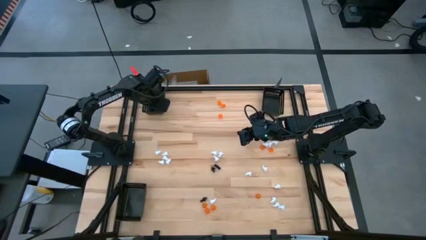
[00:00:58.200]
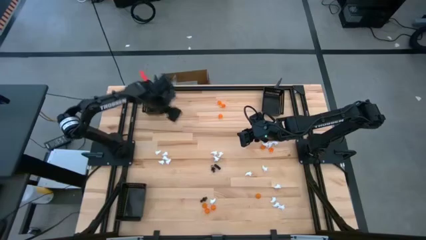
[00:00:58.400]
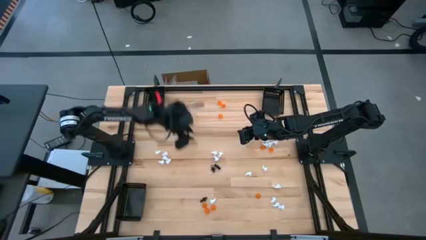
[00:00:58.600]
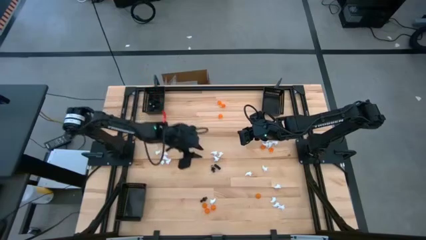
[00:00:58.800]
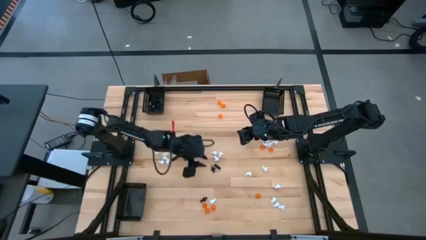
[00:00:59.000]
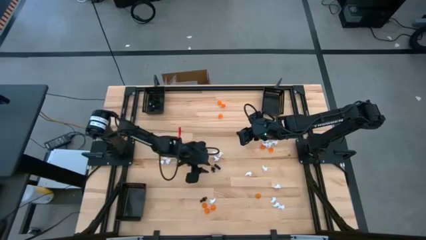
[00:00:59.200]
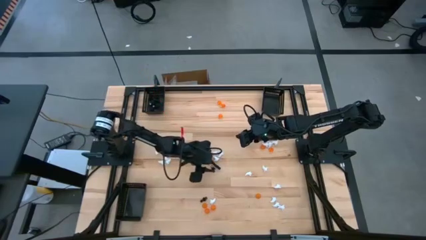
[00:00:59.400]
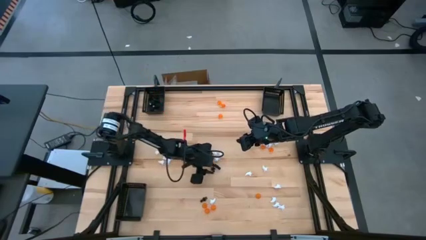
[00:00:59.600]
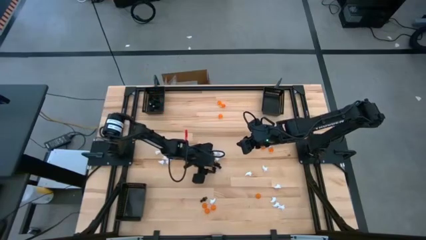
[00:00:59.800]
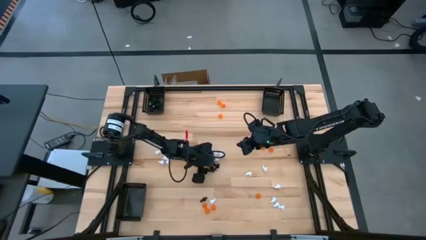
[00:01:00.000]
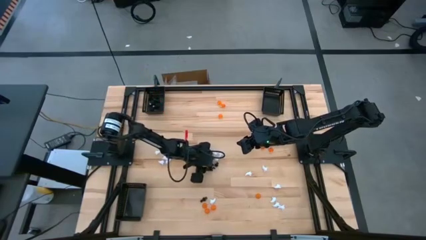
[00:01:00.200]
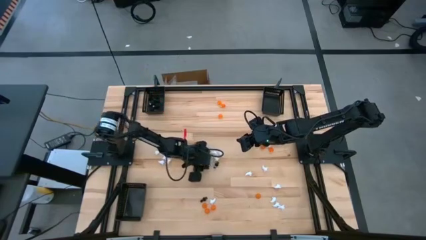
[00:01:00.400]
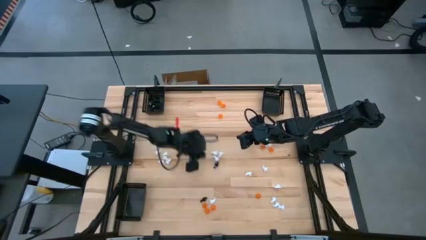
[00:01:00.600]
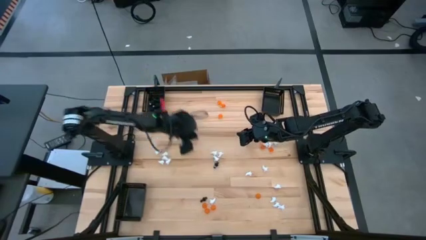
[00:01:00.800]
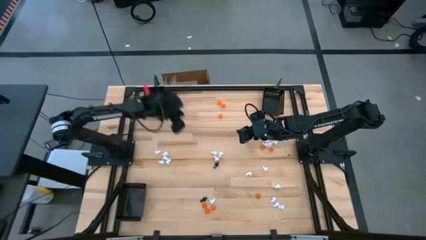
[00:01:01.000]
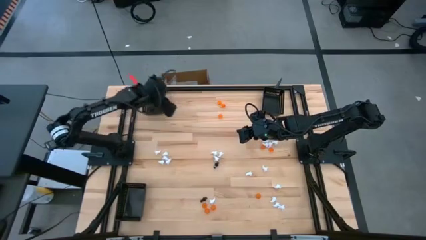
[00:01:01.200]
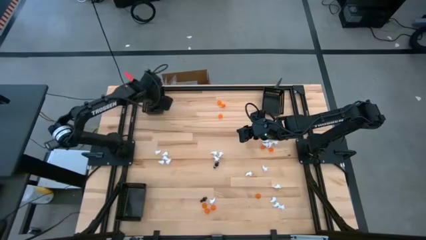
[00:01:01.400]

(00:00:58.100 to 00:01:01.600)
Task: Sort Halloween decoration
Put the black skeleton toy into the top left black basket

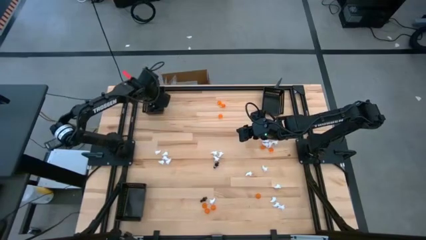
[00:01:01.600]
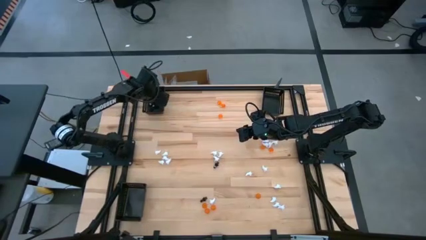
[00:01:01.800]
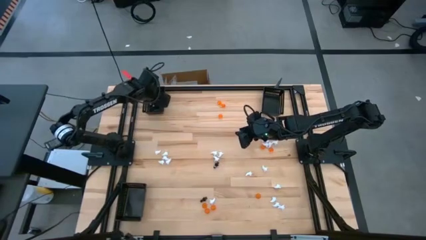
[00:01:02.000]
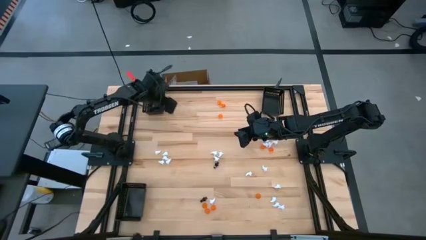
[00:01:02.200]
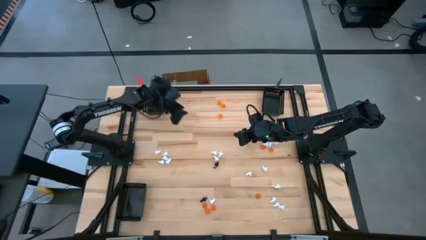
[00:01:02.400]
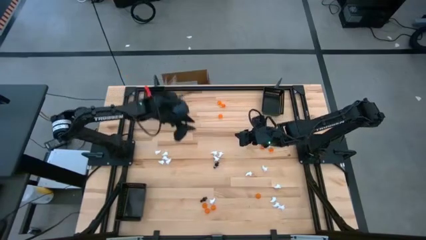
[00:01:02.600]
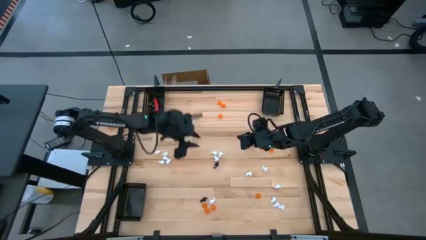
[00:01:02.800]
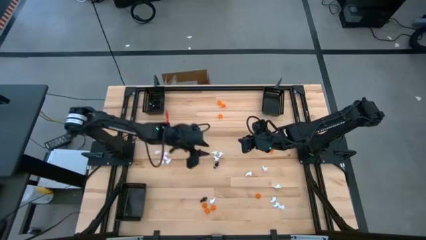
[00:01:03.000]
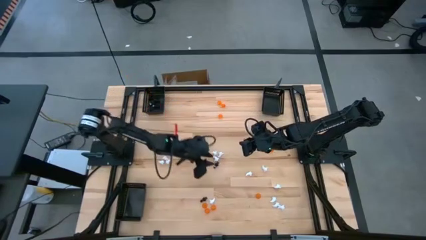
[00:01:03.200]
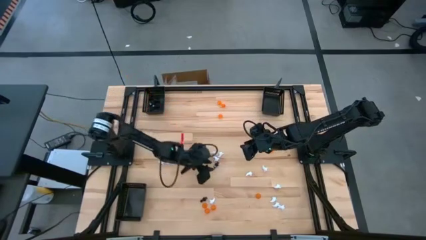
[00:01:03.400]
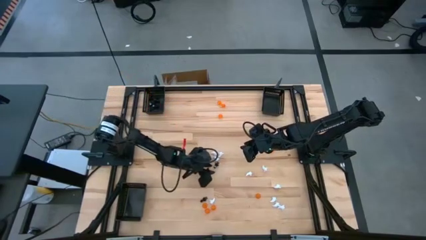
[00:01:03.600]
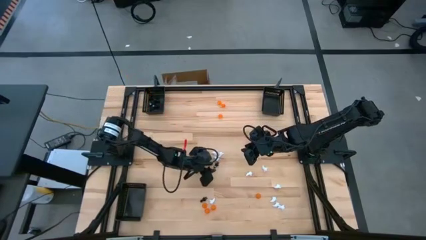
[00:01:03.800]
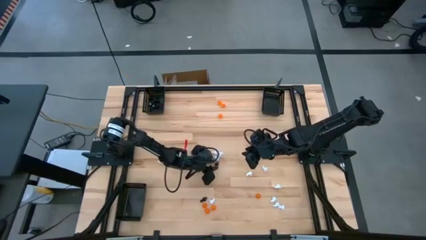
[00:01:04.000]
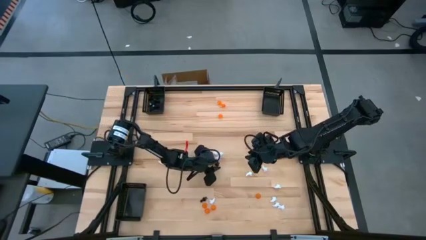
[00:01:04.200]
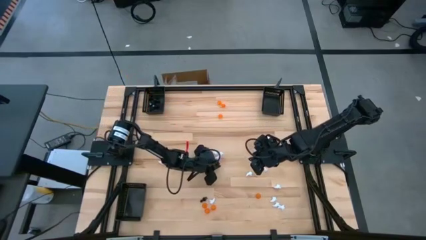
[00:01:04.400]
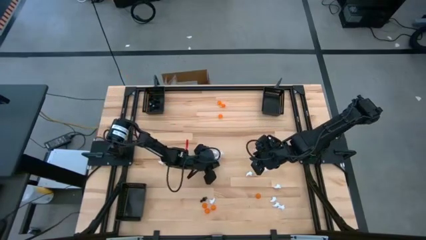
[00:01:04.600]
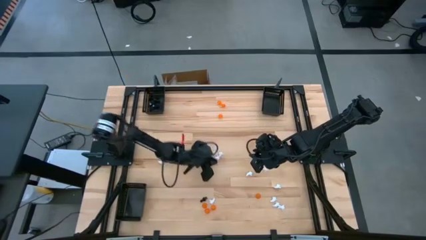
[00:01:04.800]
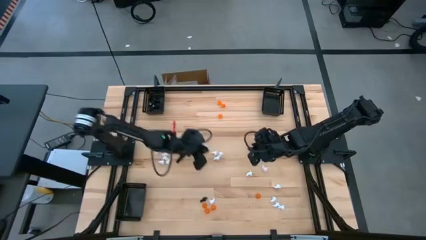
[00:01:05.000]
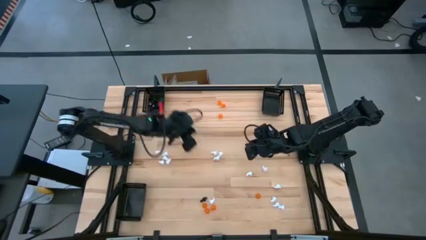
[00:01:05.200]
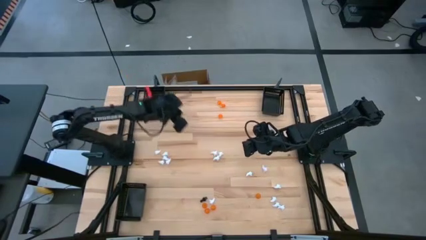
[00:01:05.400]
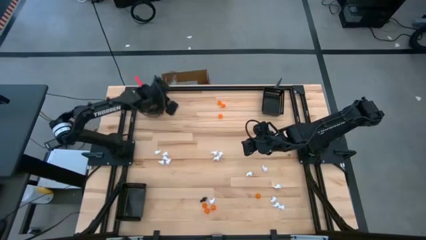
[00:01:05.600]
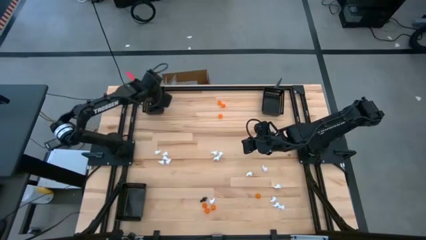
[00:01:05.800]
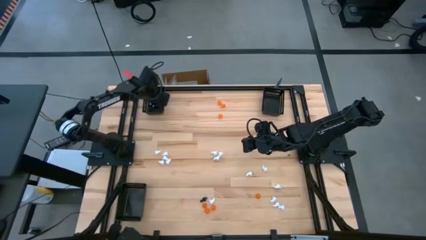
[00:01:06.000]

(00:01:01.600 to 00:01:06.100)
Put the black skeleton toy into the top left black basket

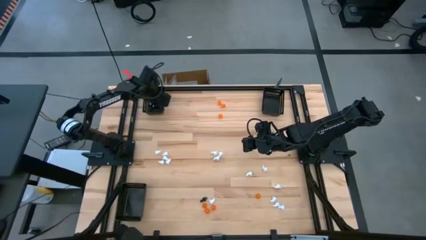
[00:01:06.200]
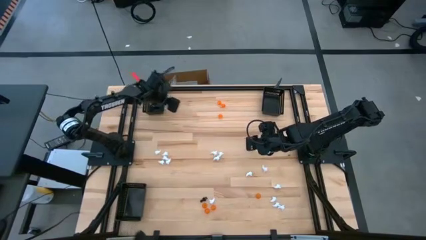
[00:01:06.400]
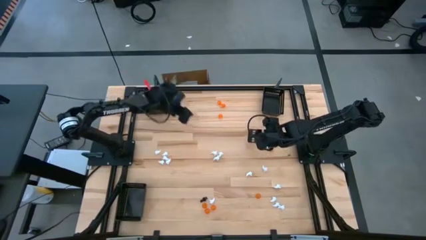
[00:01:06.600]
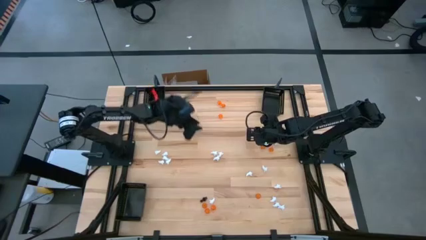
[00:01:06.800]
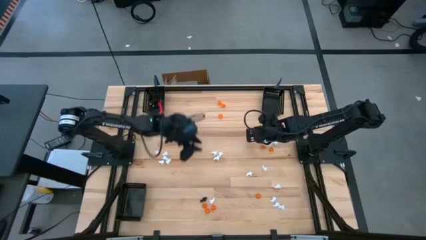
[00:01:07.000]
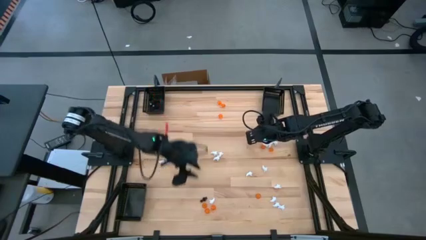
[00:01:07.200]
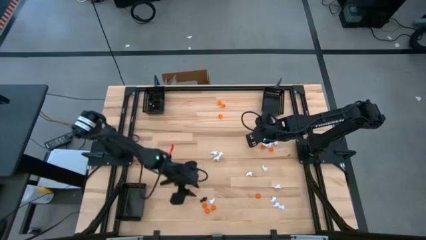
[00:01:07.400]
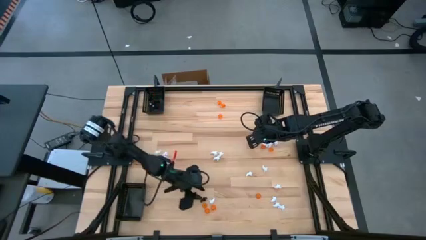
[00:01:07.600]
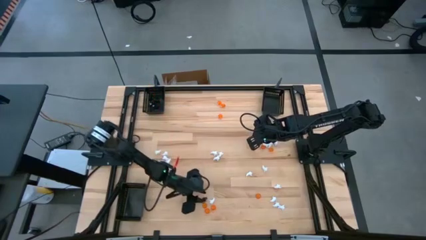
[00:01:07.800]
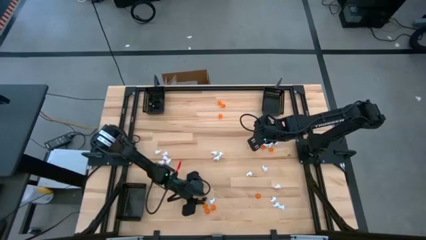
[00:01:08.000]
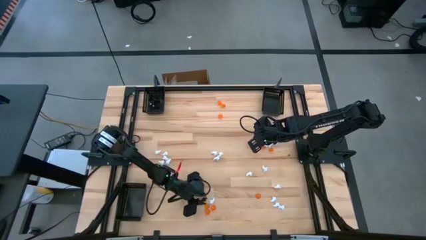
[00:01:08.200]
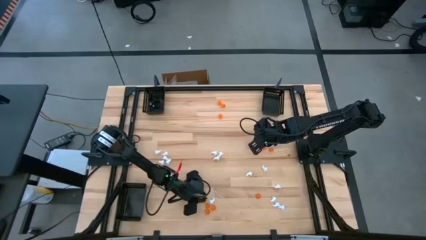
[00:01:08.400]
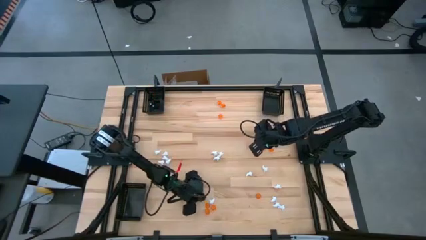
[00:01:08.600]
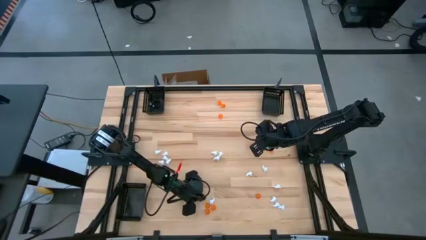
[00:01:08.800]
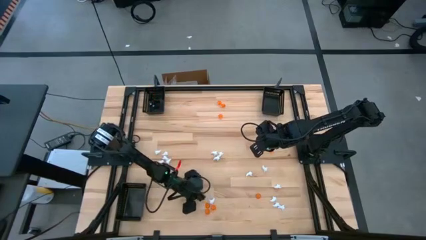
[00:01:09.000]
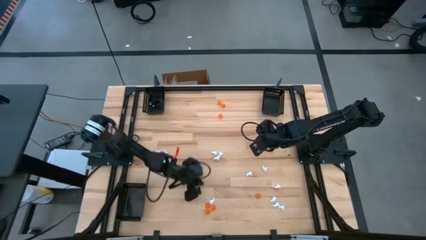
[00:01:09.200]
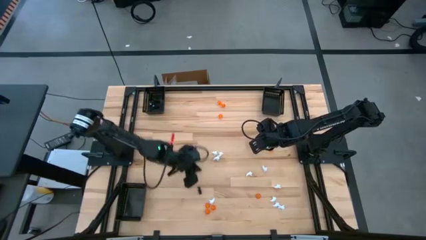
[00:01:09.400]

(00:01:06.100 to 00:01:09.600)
Put the black skeleton toy into the top left black basket

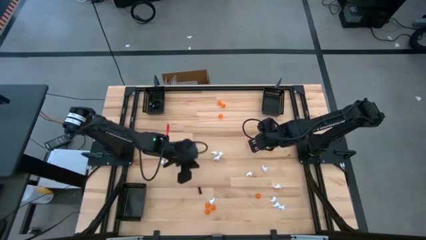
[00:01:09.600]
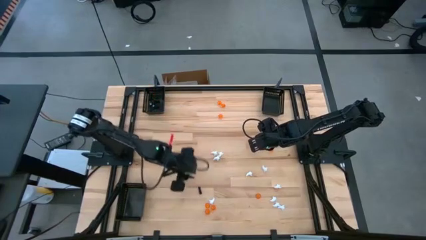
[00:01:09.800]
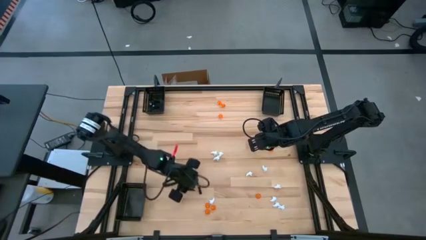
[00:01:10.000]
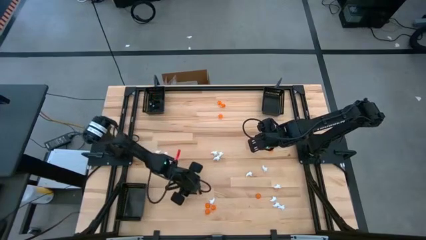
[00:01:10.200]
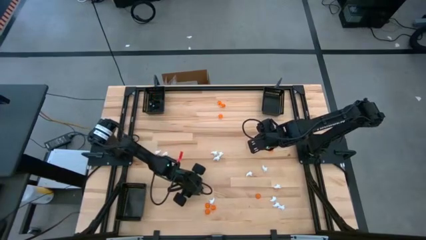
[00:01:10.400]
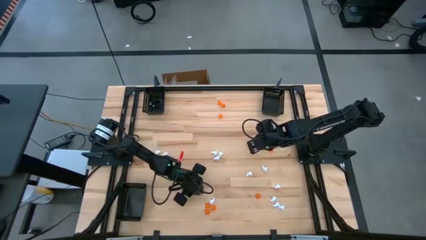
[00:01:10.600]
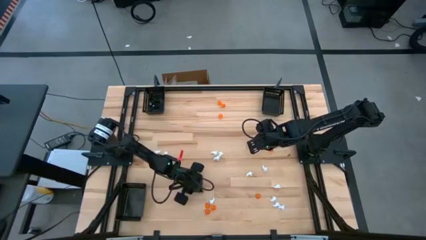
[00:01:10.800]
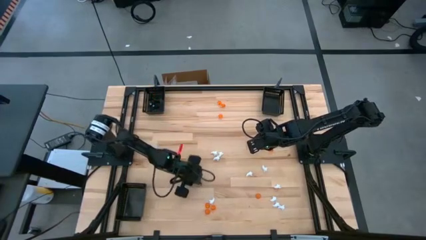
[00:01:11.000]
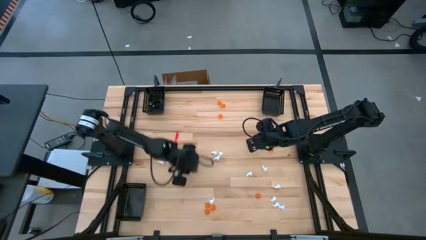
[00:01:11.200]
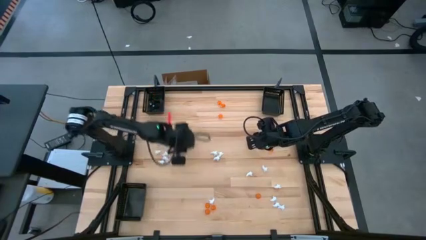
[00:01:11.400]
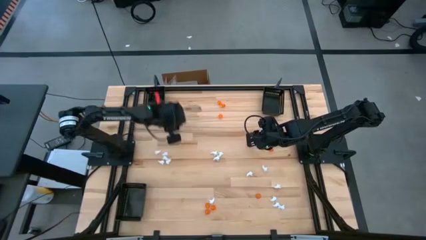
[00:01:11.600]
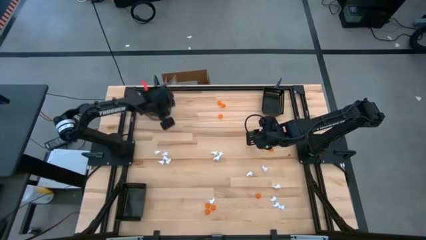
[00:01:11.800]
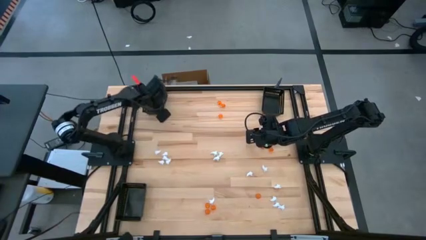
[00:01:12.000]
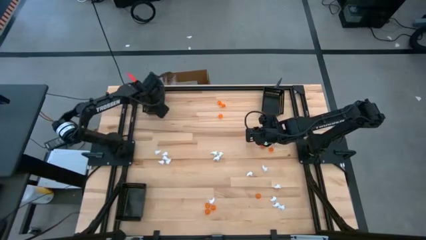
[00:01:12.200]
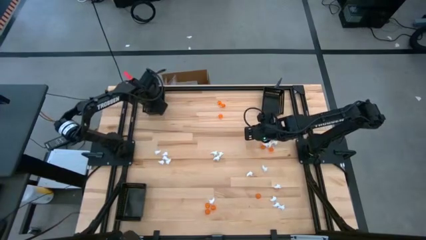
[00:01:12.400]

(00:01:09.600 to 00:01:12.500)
Put the black skeleton toy into the top left black basket

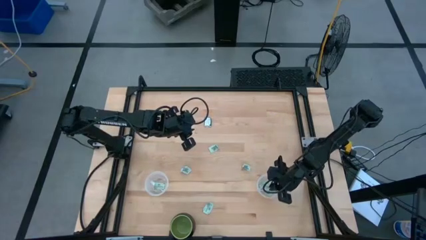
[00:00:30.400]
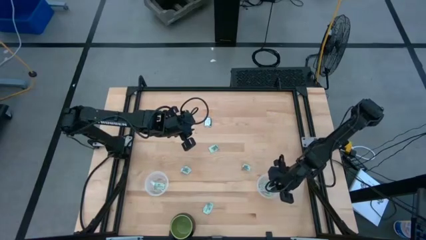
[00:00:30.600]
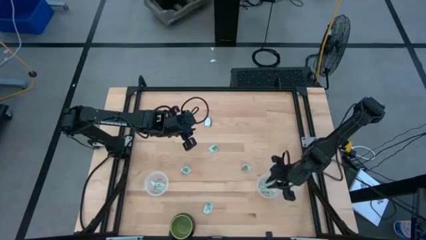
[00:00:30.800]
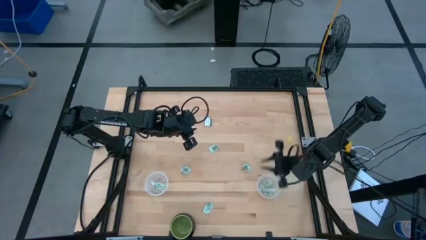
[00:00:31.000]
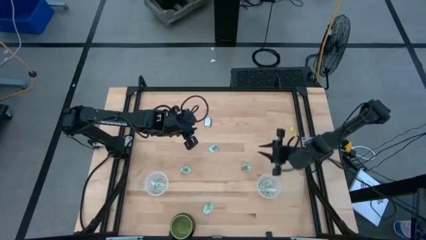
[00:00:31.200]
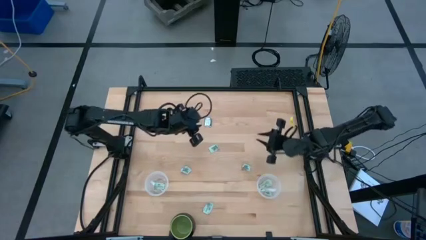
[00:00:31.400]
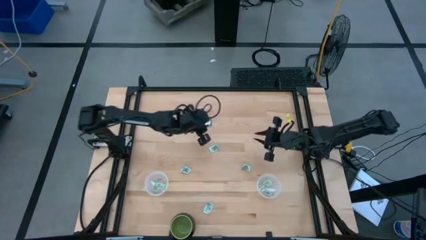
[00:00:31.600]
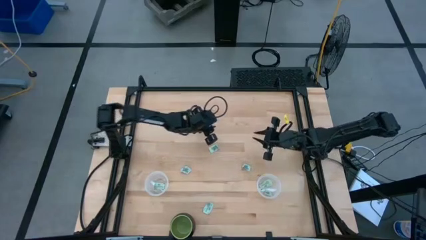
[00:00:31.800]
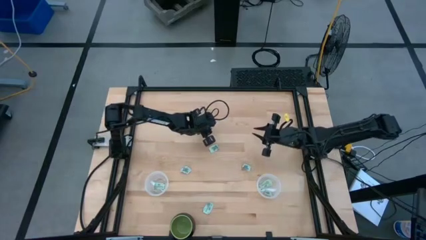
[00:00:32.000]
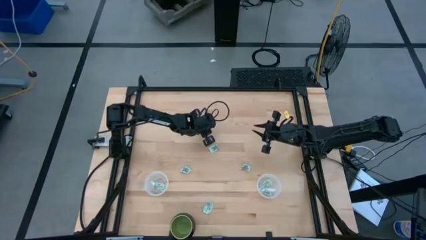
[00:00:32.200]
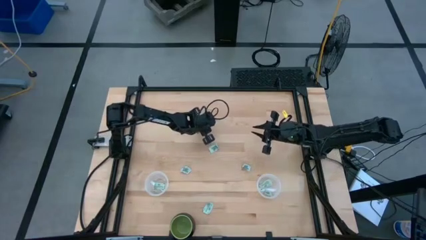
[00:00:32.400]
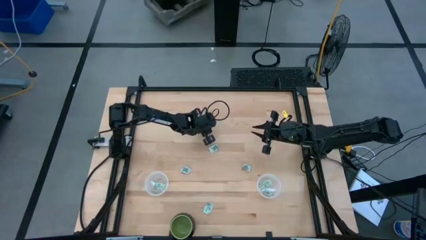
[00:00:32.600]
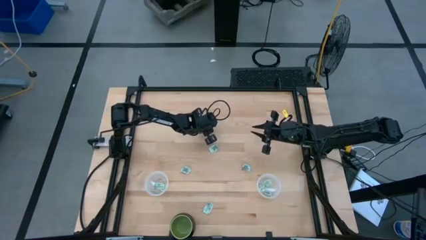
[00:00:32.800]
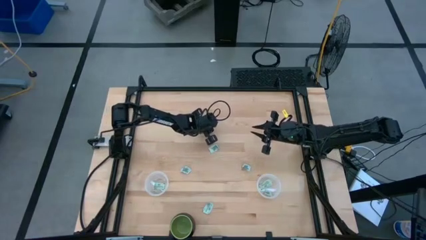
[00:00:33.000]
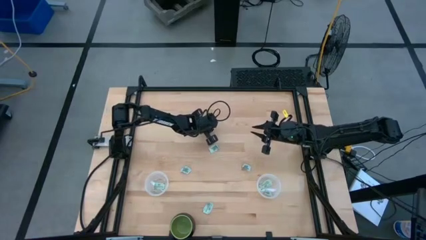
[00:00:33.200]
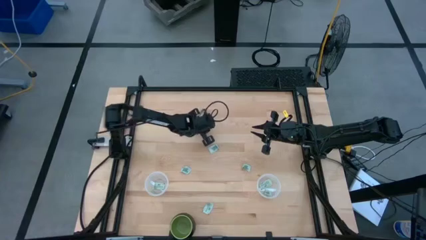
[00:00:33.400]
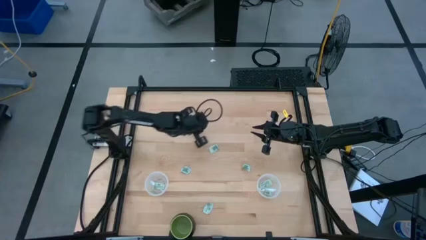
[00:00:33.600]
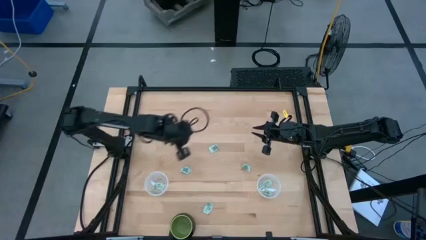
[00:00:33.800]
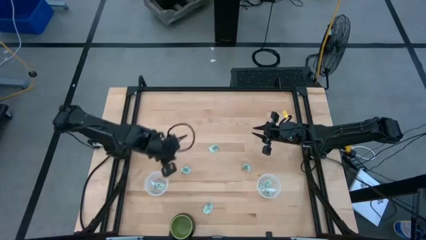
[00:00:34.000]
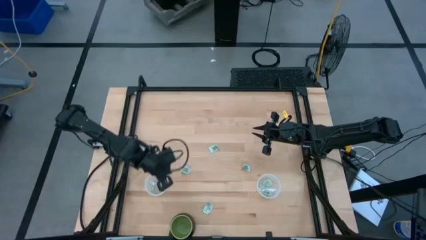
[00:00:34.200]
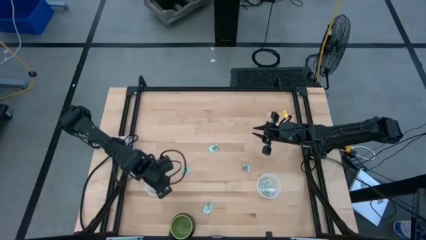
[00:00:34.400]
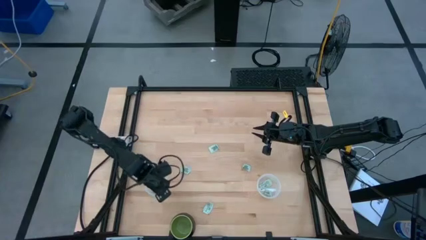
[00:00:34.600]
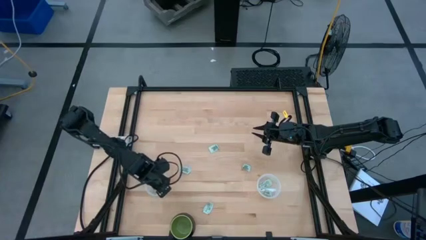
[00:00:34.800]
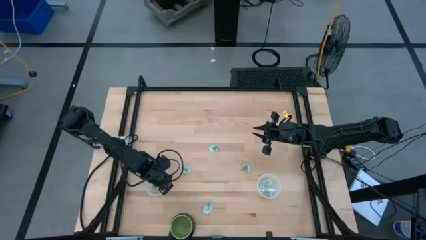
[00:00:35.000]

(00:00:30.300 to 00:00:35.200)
Task: Pick and place Stevia / Truvia into bins
Put the green truvia packet into the left transparent container
